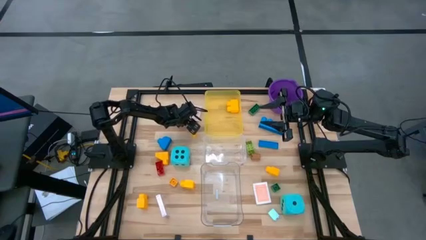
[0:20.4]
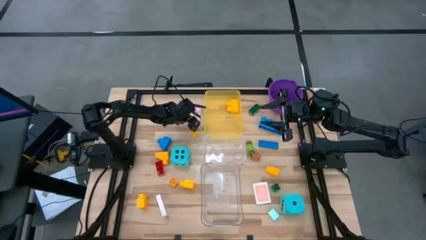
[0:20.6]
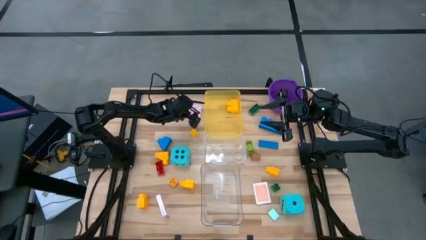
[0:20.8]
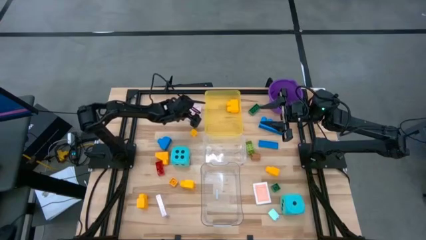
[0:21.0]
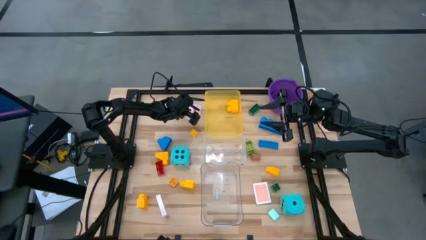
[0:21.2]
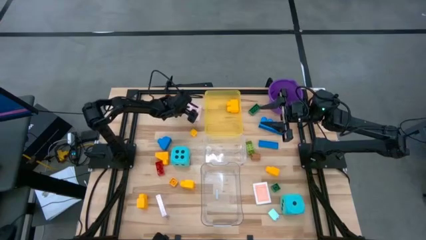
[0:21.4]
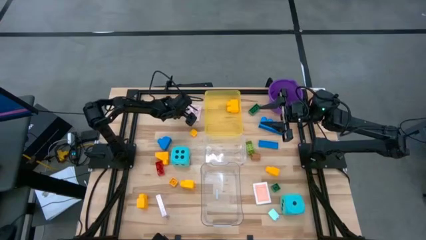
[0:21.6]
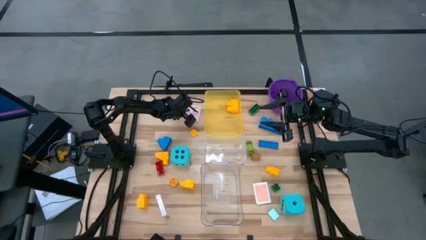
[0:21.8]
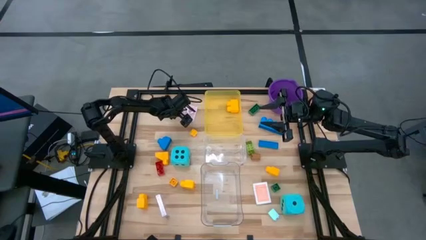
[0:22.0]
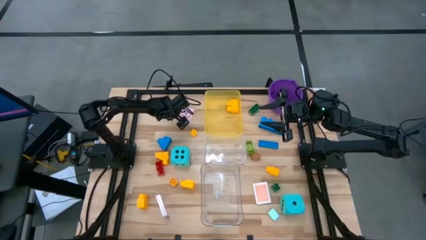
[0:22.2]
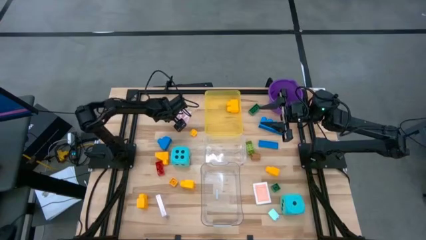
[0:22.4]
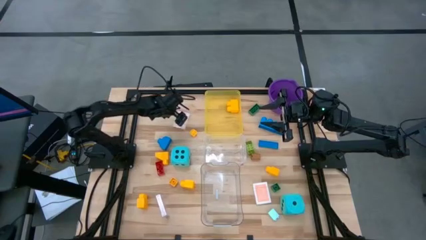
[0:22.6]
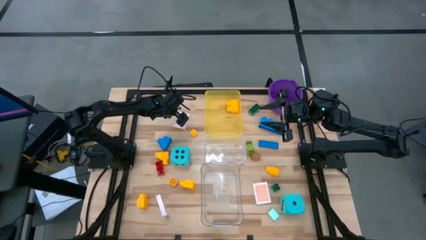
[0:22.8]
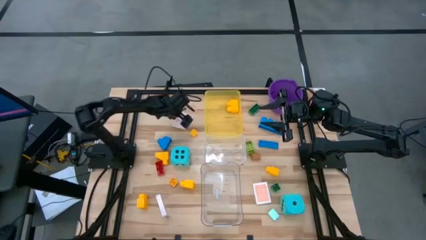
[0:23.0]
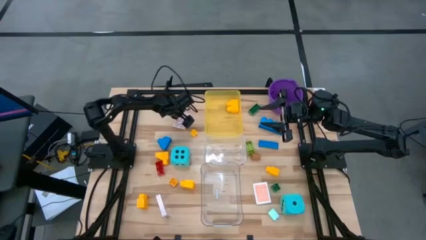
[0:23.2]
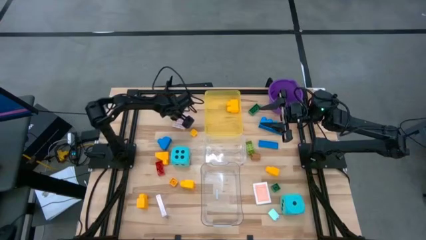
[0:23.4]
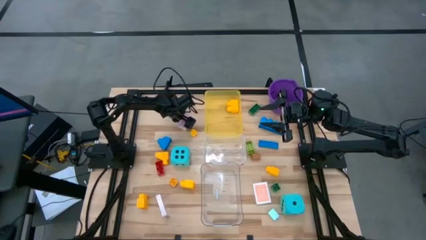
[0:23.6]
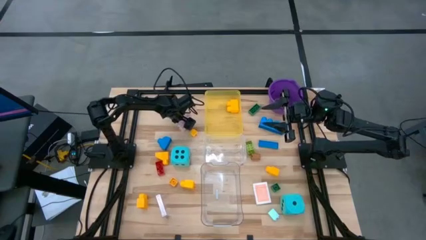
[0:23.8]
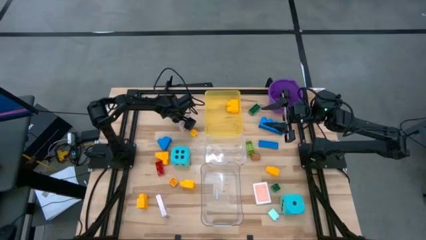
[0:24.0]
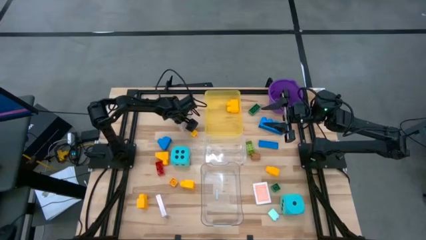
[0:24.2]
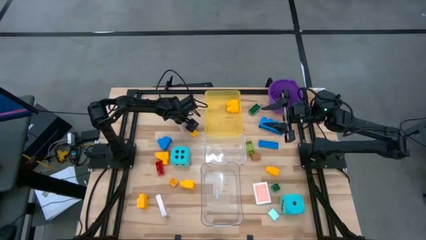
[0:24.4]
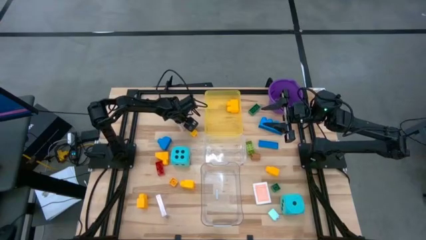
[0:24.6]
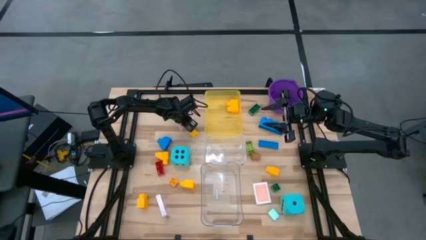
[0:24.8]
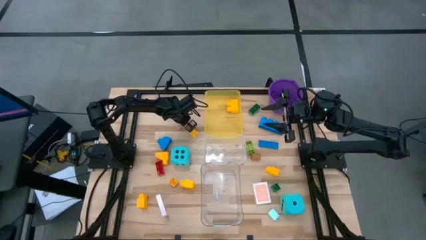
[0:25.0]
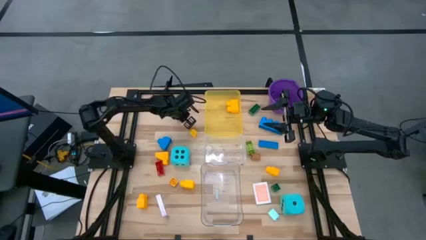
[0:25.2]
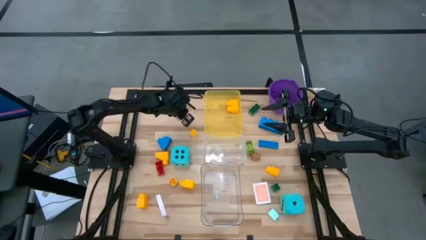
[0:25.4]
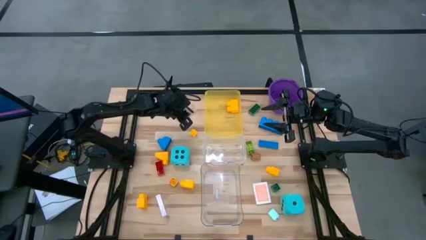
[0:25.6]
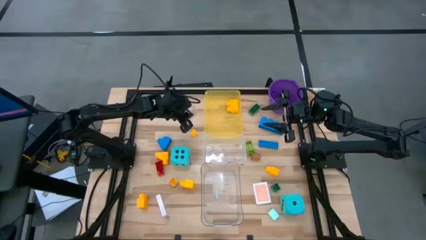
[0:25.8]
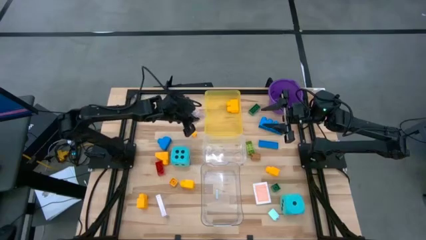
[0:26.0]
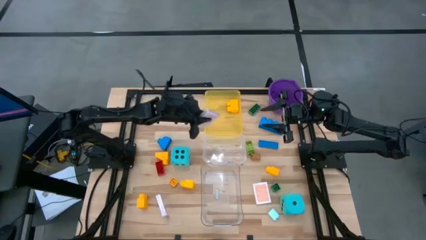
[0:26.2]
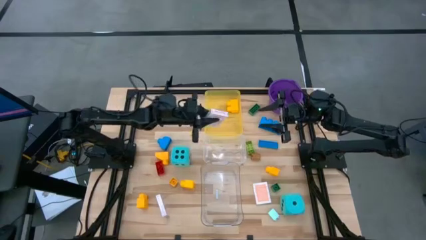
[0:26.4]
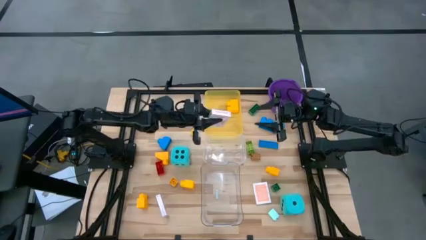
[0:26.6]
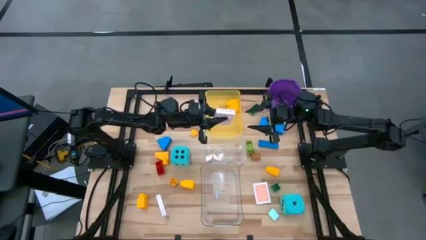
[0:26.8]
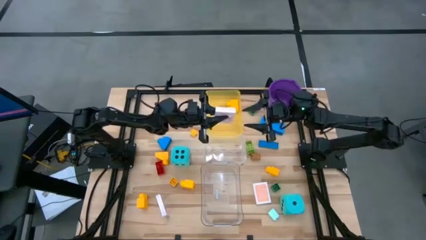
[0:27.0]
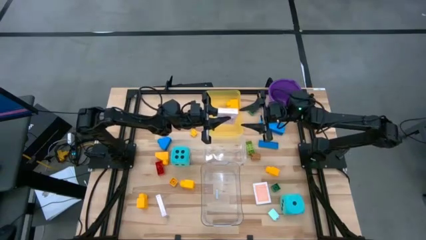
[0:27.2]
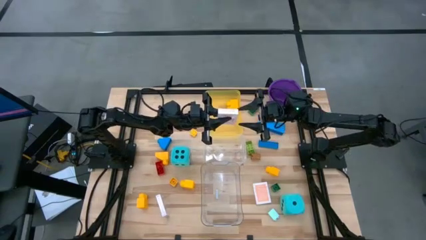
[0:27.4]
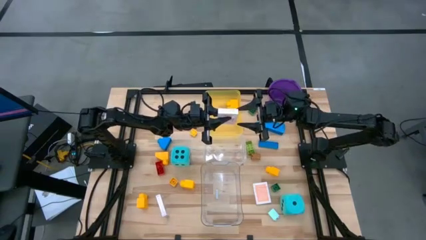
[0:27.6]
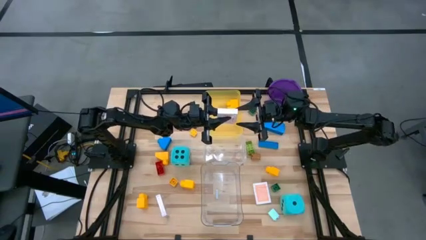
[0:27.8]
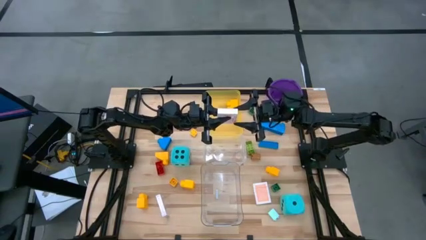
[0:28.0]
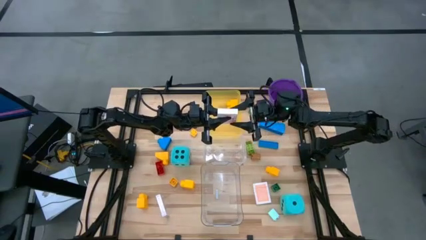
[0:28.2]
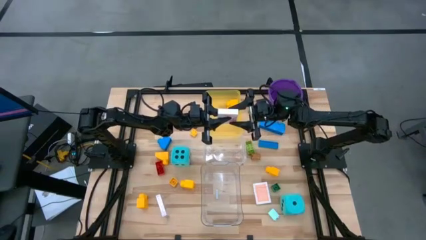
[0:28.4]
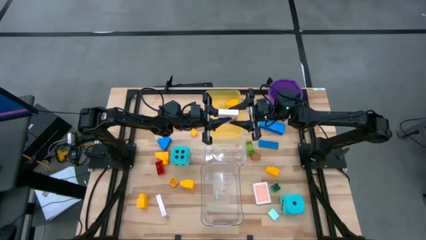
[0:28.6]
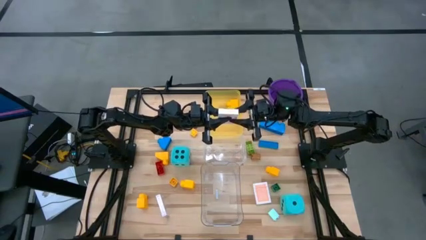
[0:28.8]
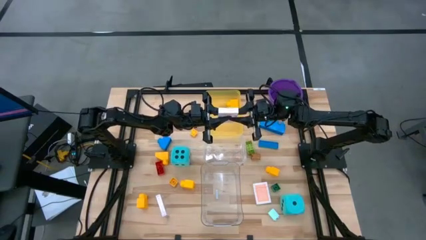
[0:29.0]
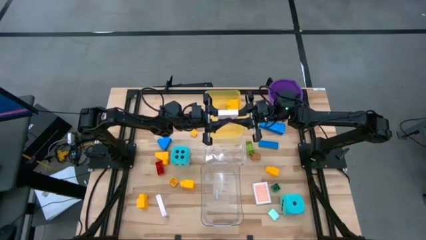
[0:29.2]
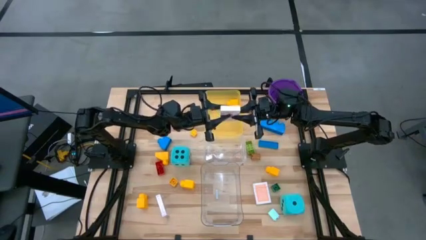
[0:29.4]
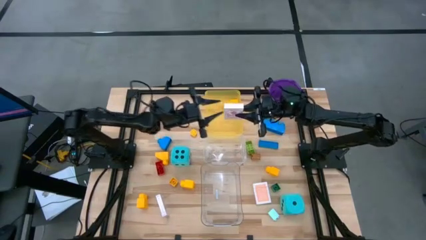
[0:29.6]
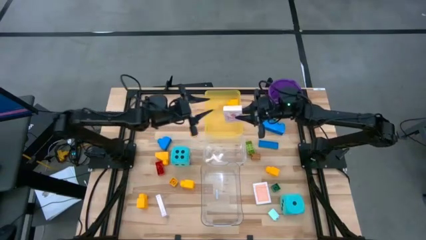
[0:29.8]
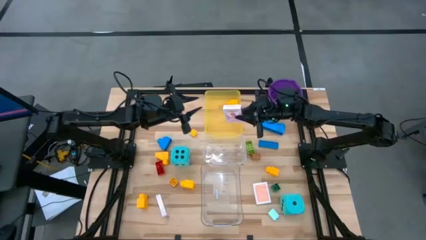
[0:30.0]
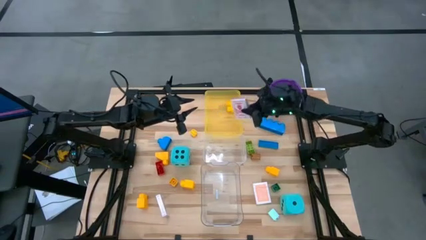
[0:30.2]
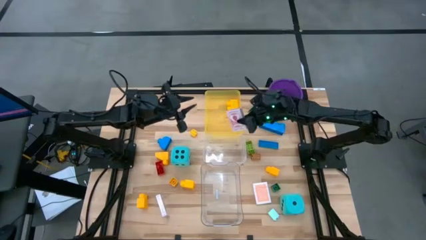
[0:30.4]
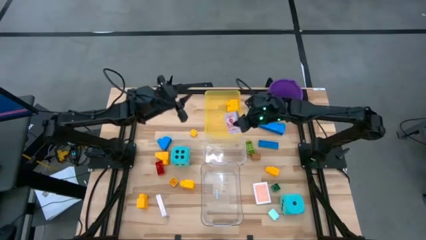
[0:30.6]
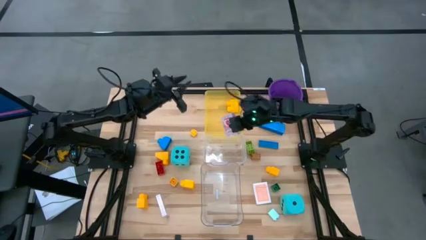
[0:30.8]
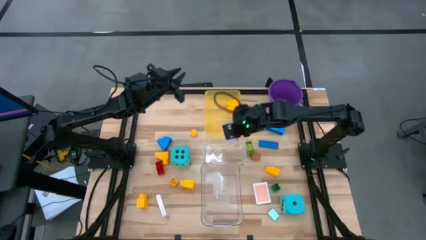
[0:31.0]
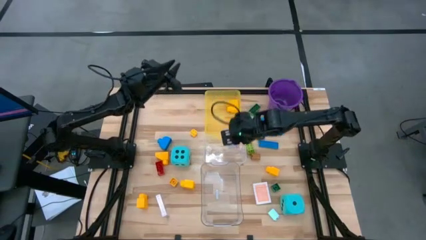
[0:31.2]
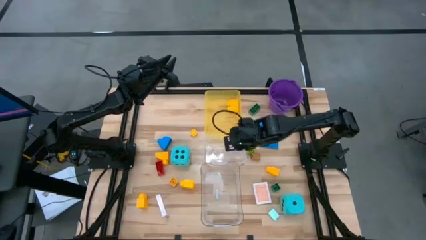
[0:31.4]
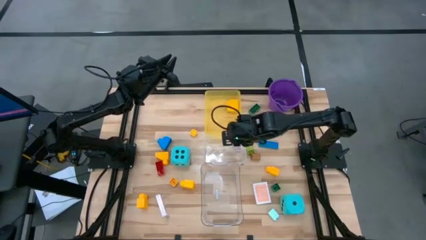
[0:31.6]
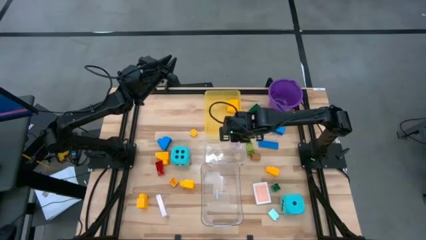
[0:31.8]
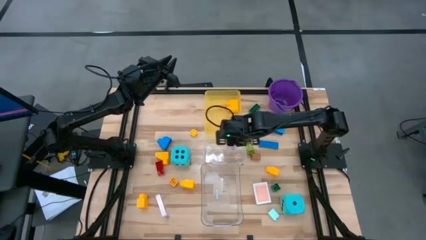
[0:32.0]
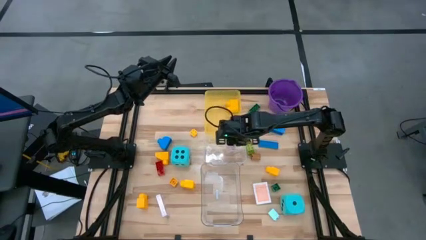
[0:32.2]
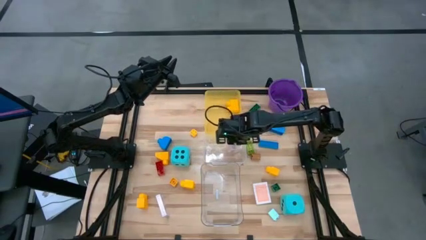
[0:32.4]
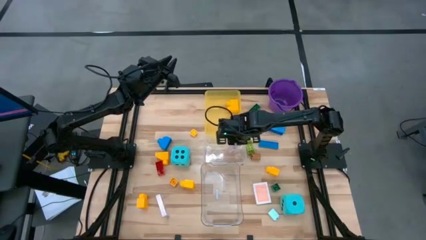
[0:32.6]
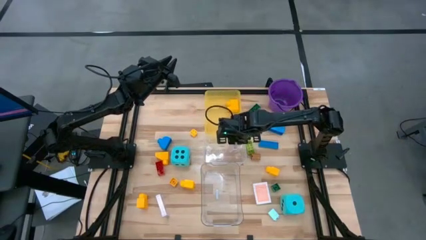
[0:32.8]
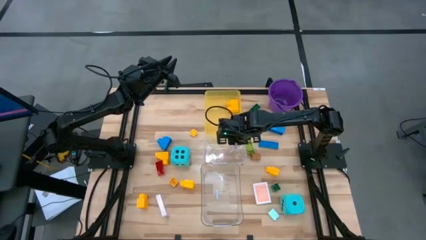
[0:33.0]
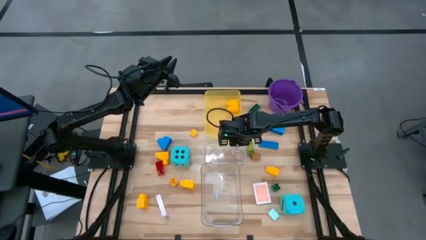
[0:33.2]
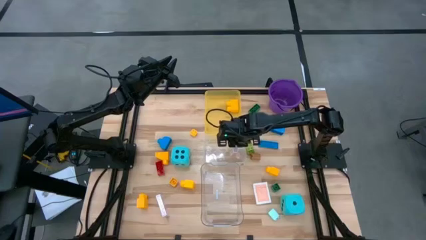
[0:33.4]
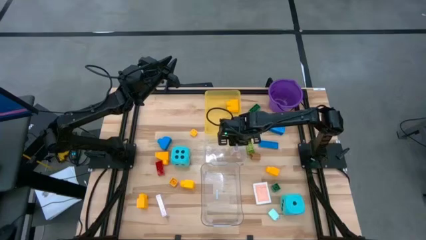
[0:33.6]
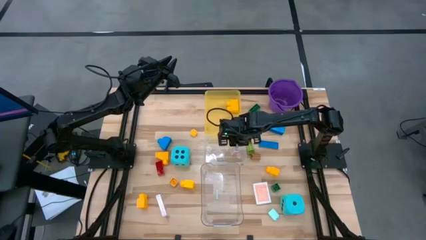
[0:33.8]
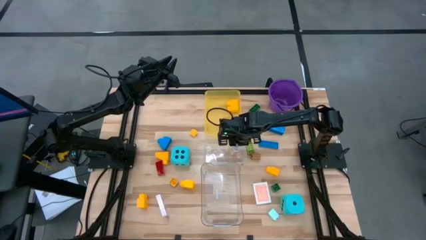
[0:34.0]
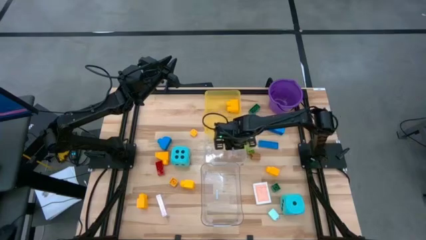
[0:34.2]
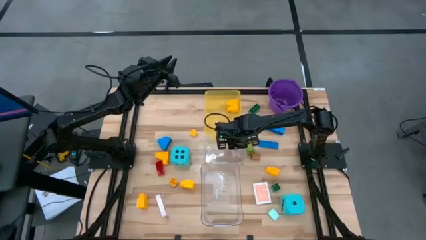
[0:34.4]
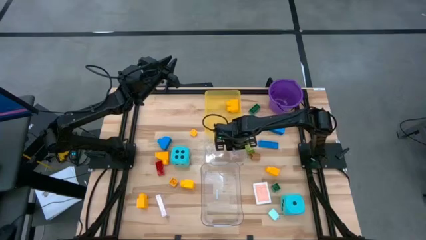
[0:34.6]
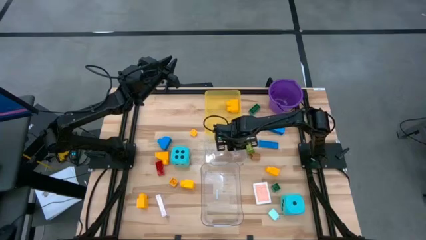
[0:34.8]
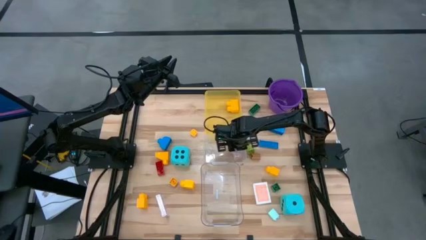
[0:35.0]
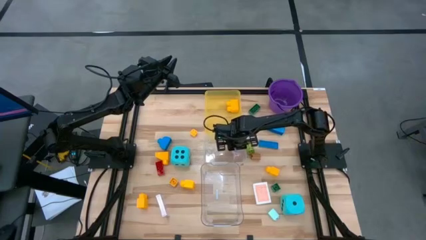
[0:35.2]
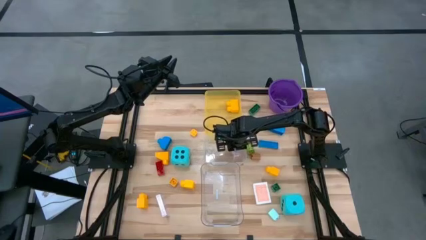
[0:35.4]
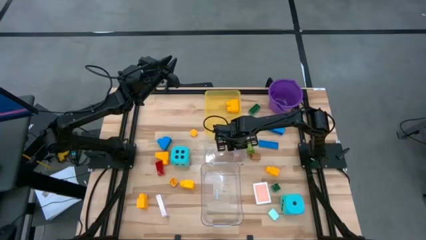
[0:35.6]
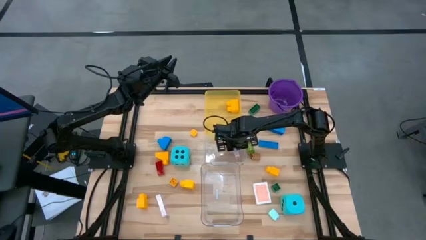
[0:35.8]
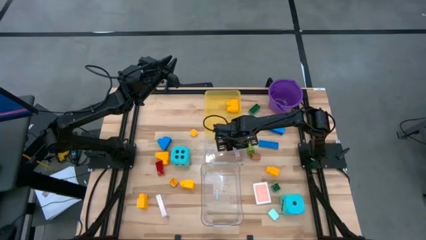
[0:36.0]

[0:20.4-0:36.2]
Task: Pick & Place Toys
Put the red deck of cards into the top transparent bin

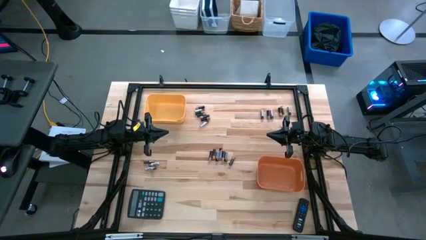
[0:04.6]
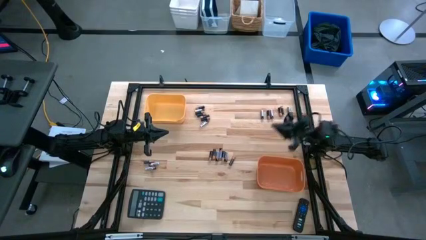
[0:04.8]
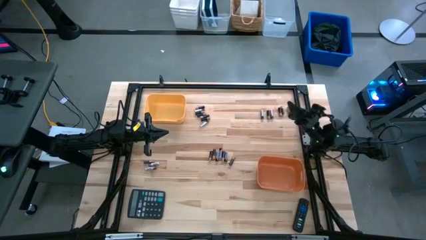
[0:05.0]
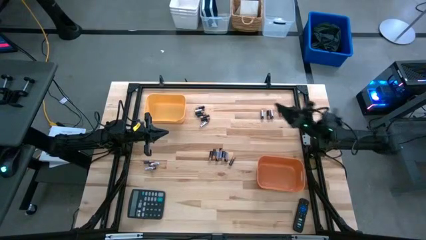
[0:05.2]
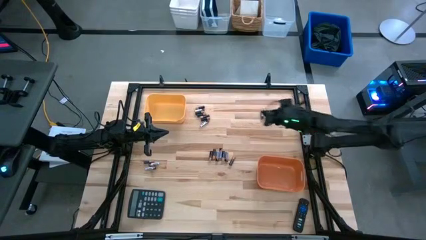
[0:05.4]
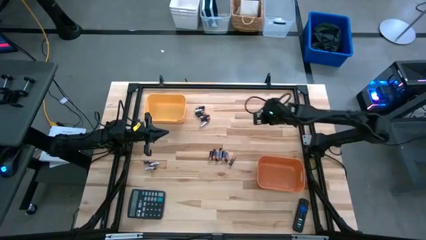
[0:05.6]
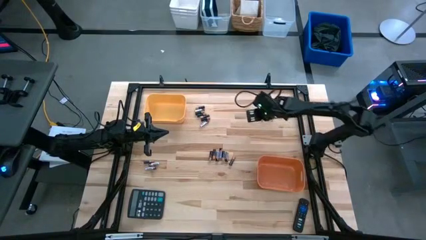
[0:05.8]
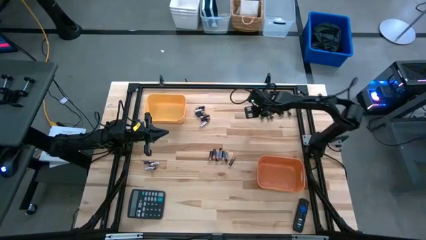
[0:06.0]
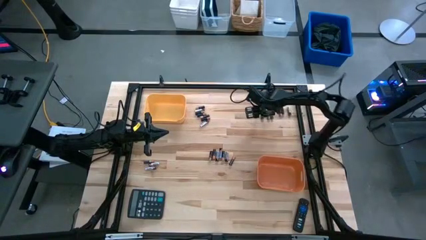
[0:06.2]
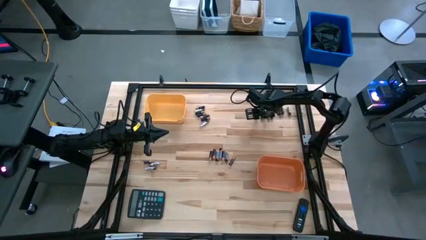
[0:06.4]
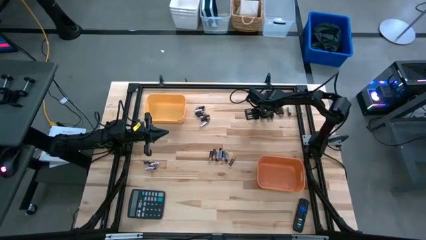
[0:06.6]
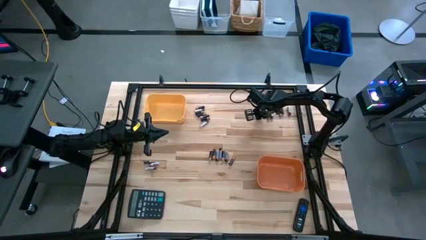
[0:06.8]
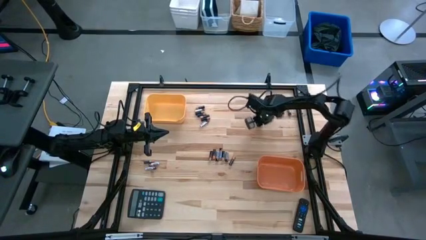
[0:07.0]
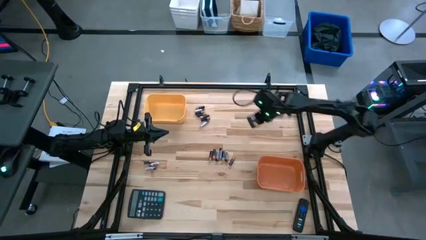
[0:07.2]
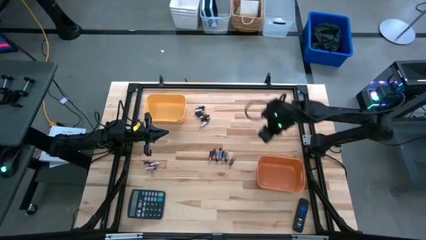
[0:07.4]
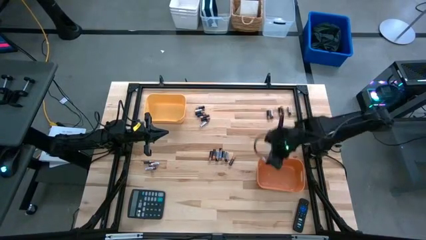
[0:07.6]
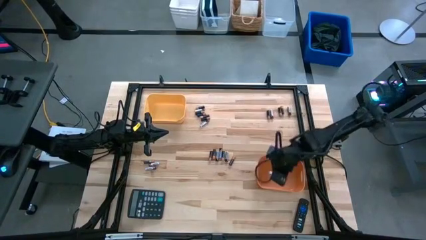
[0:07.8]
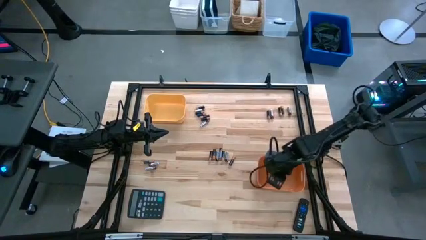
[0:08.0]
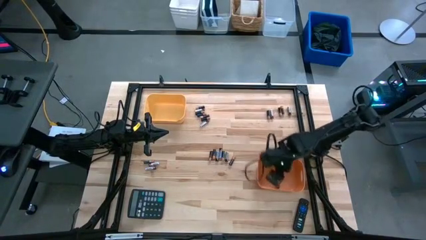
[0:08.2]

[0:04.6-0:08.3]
Task: Sort batteries
Put the silver battery into the orange bin
